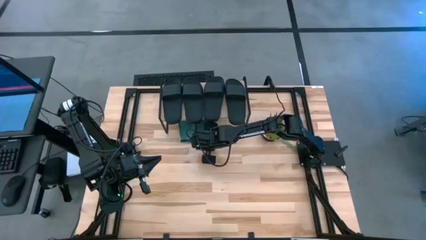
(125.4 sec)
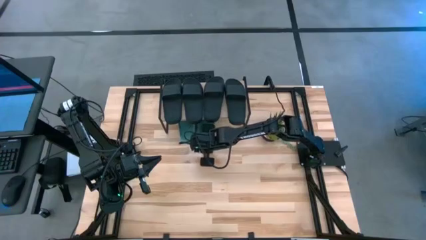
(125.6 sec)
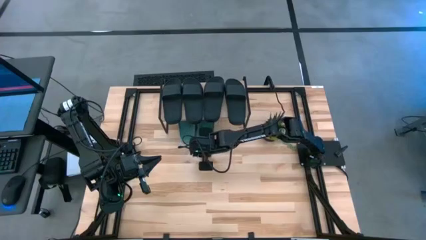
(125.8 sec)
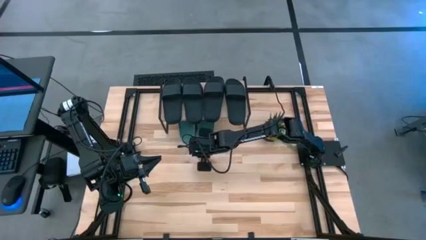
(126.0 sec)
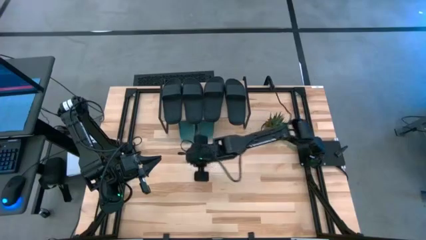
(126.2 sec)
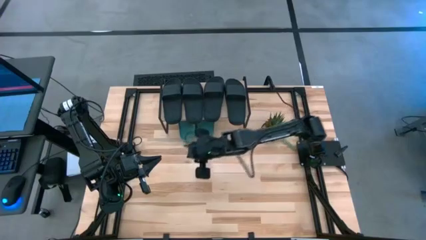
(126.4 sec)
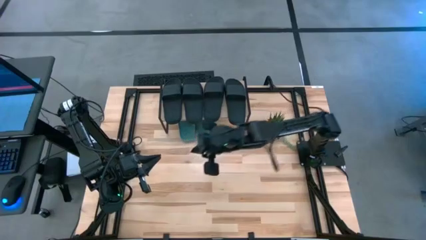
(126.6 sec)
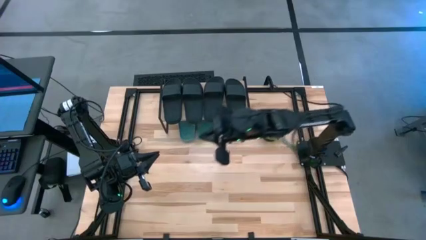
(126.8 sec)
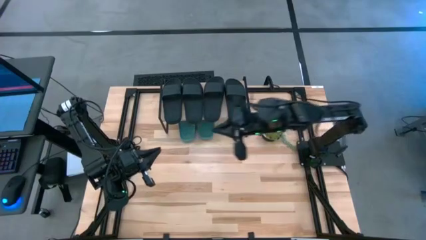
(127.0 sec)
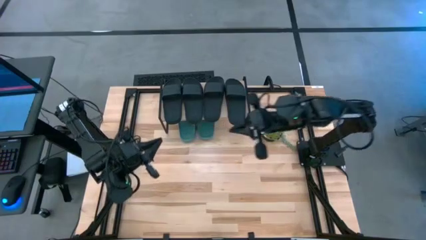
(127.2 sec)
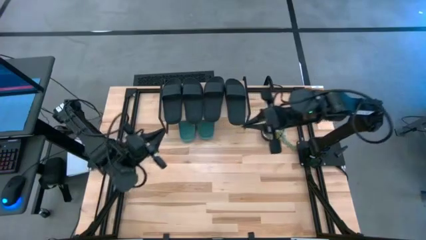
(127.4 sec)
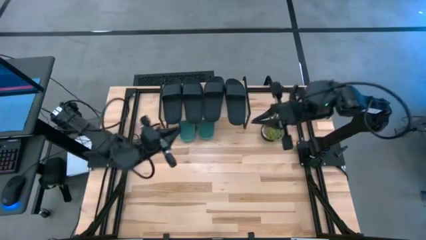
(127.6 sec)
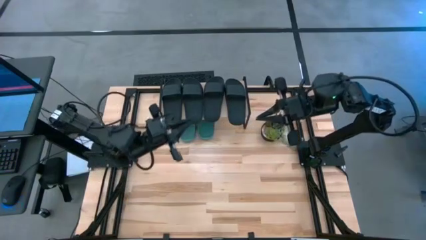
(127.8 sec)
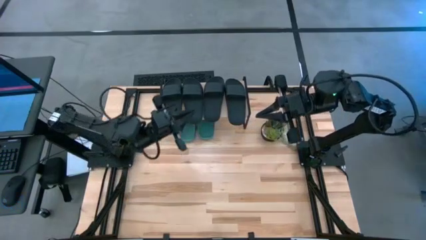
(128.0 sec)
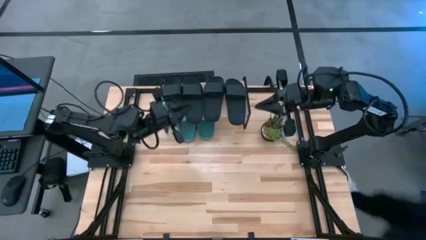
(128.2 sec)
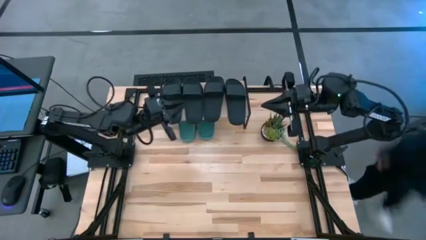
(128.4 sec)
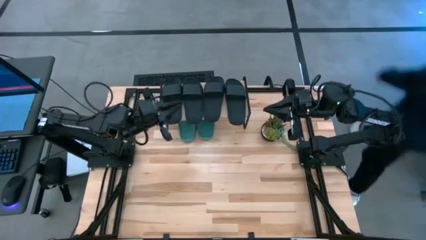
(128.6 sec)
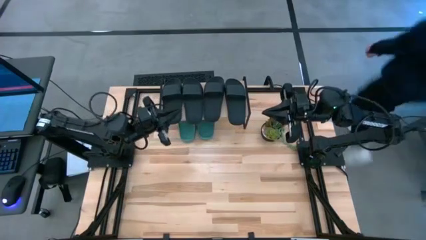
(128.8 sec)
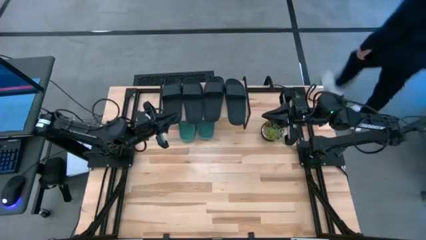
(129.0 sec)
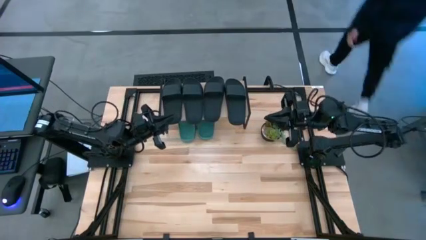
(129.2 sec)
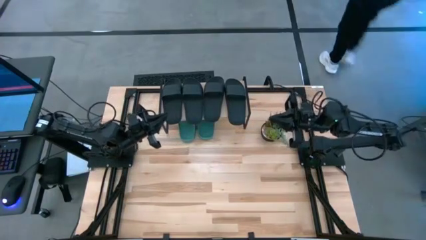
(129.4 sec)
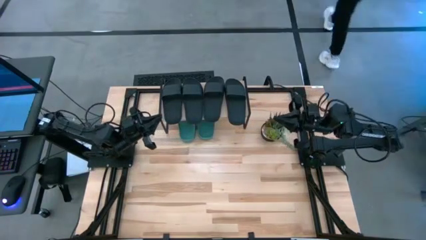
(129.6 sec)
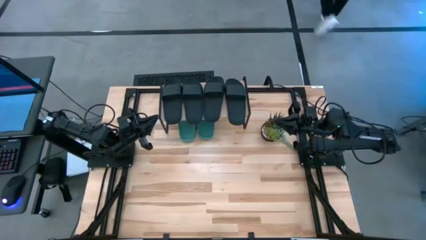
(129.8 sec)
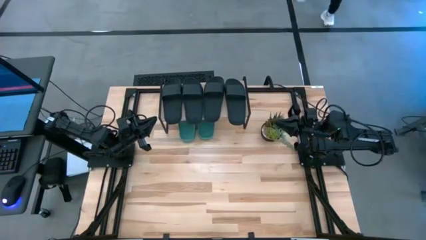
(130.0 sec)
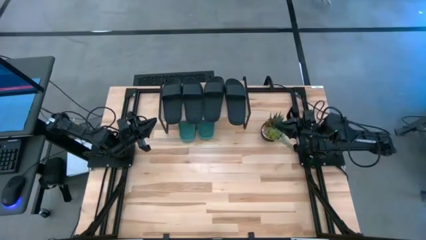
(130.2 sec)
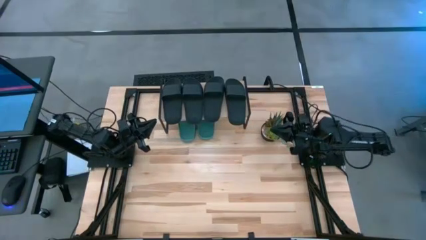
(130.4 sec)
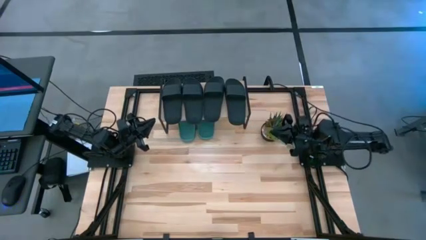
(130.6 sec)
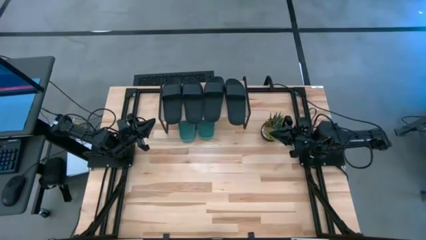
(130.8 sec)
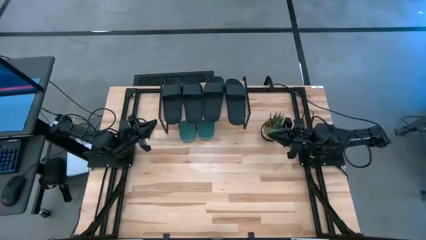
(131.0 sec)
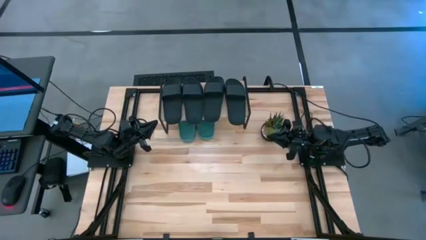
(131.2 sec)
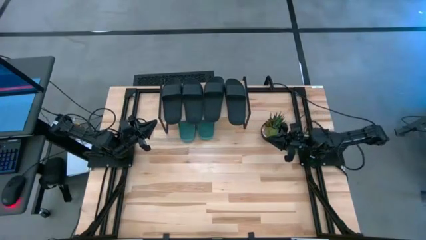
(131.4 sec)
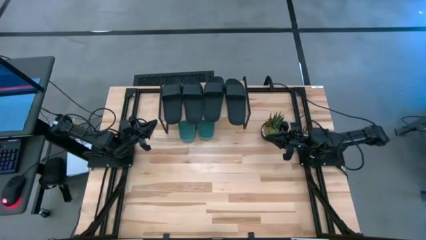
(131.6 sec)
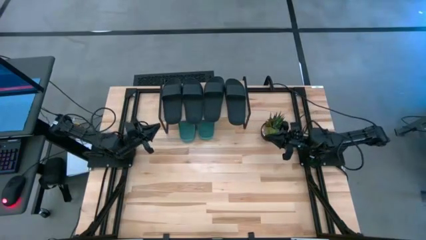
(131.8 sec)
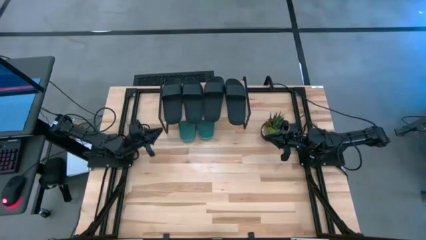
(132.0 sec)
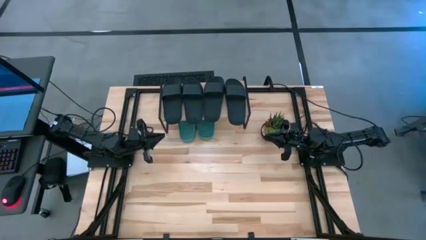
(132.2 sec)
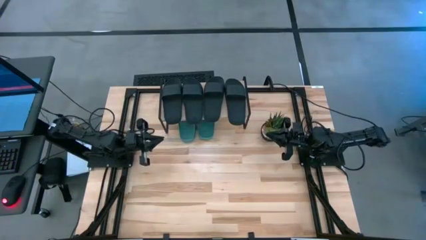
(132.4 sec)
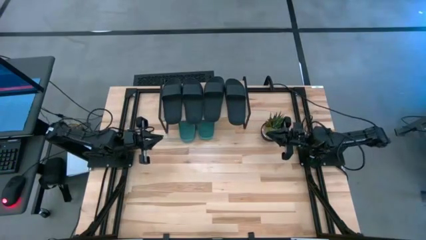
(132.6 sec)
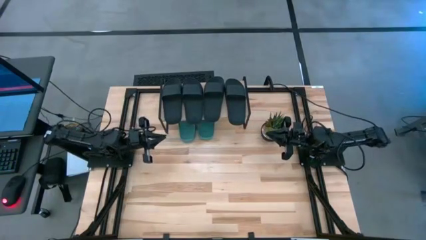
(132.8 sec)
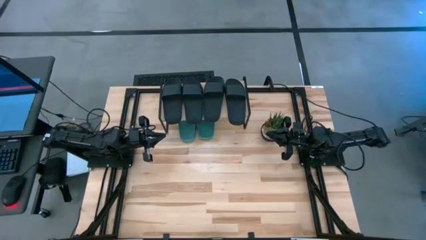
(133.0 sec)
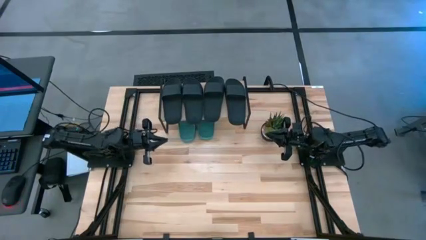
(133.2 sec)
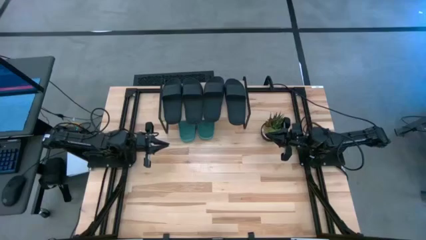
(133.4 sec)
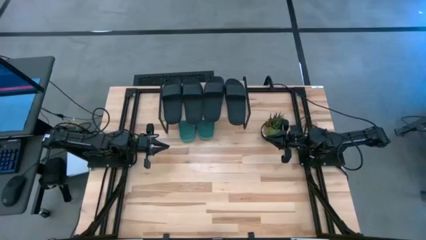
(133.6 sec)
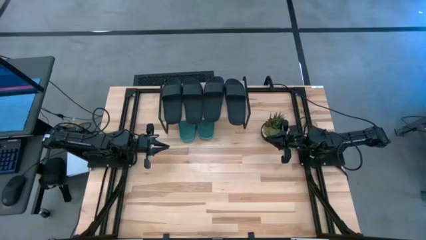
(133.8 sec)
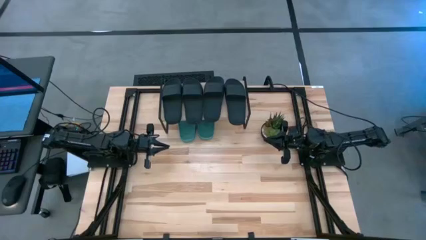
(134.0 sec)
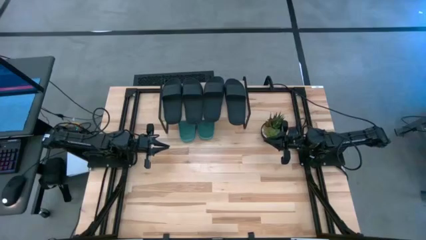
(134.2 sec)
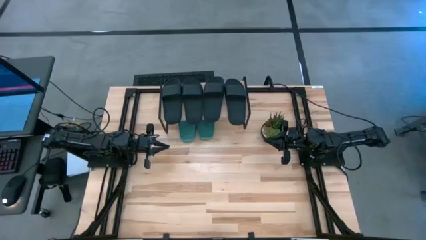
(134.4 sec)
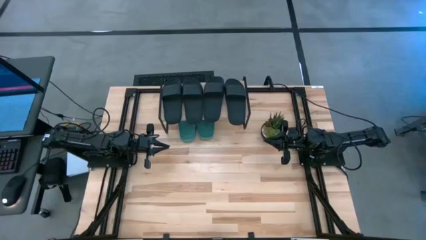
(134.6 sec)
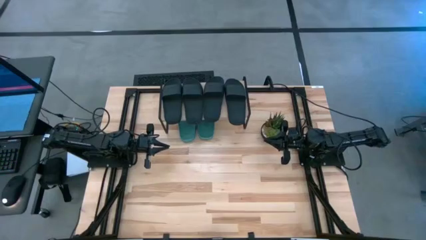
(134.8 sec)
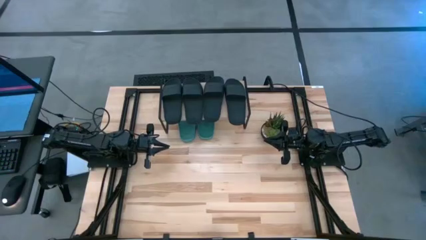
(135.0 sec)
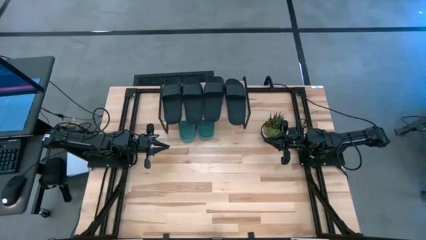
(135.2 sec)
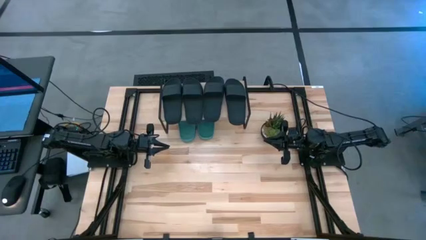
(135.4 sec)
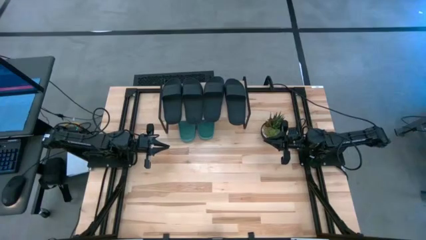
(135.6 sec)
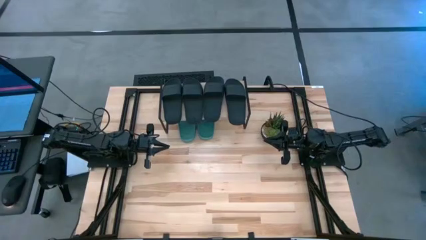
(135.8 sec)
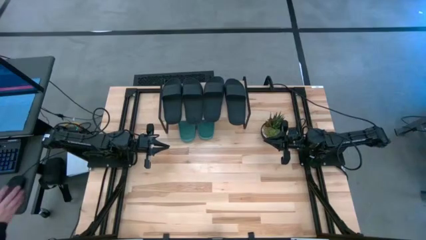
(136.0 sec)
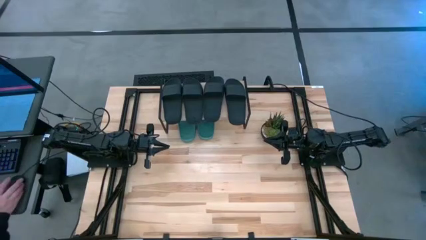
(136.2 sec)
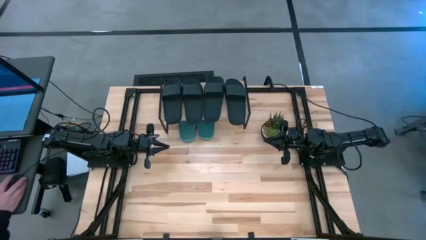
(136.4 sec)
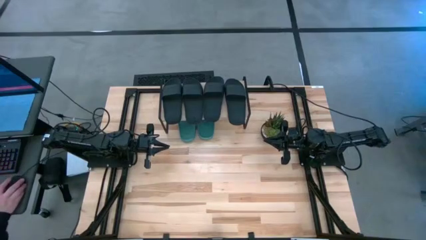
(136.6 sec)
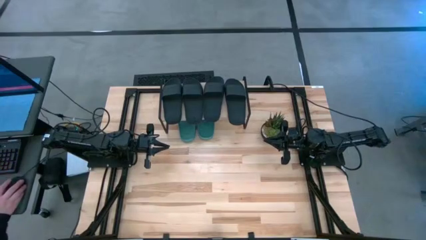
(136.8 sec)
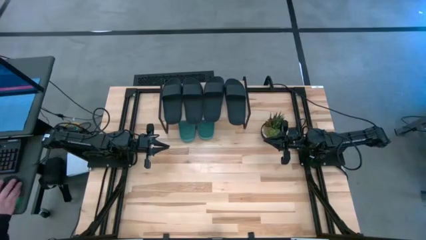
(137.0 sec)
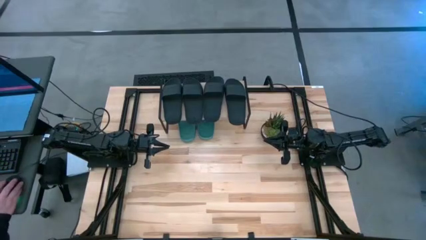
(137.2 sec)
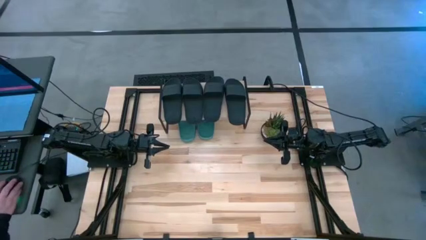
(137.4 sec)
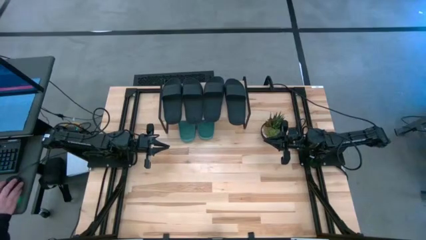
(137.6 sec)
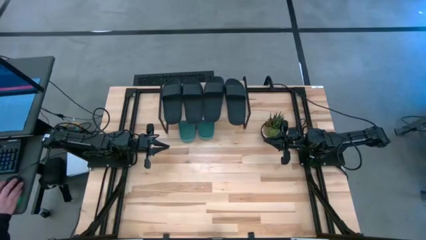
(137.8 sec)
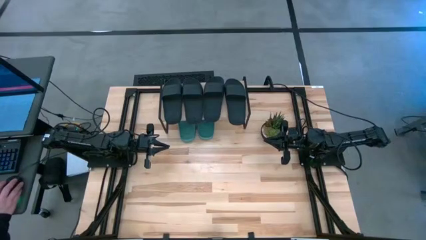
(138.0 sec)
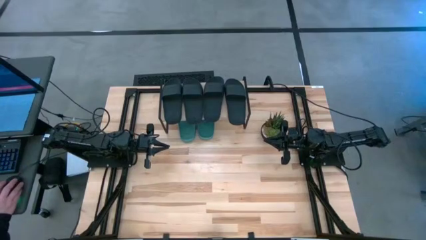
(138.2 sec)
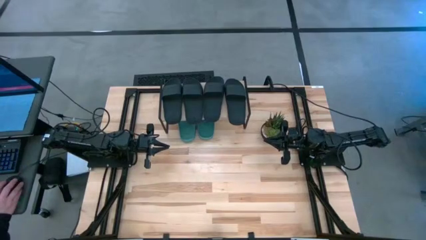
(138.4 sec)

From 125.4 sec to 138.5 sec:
Task: Pick and place slides into the shelf
Return to Home Position

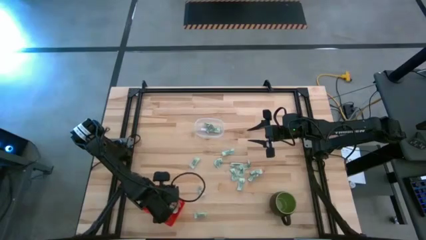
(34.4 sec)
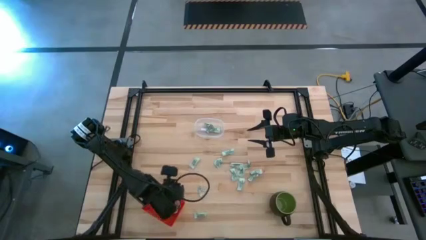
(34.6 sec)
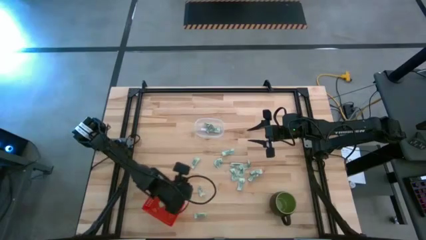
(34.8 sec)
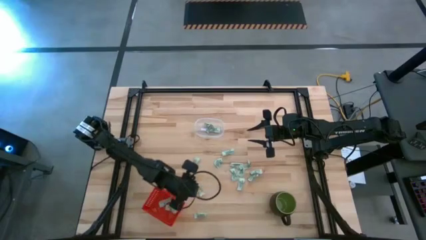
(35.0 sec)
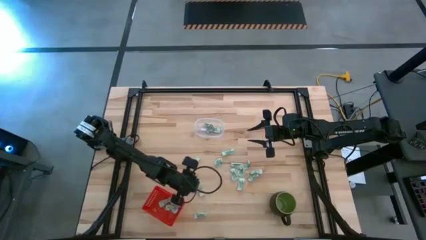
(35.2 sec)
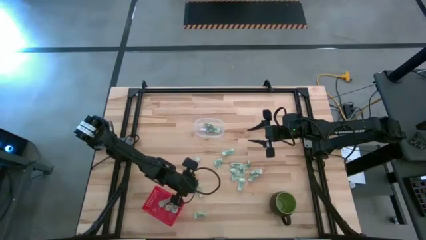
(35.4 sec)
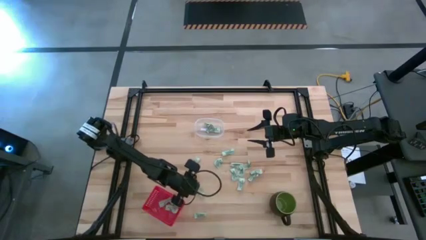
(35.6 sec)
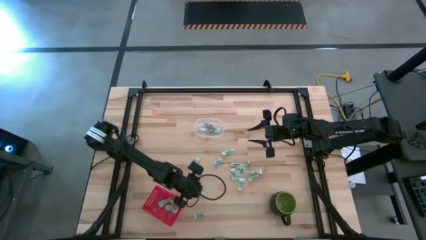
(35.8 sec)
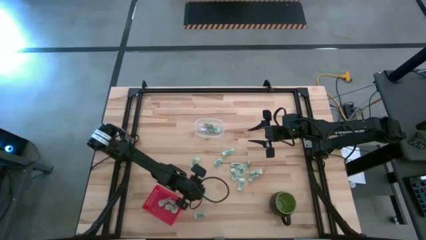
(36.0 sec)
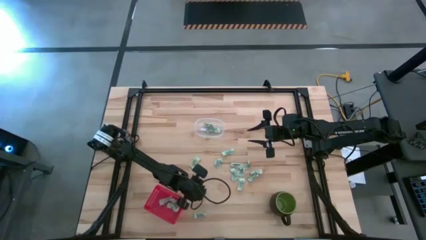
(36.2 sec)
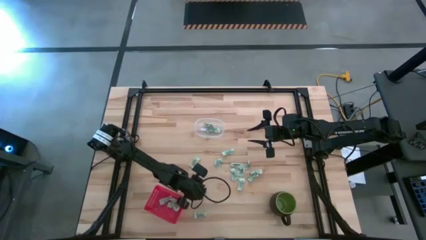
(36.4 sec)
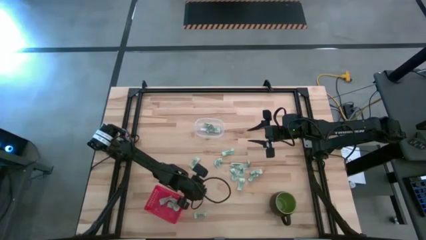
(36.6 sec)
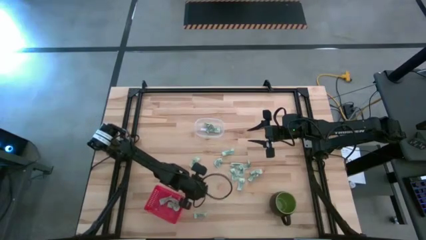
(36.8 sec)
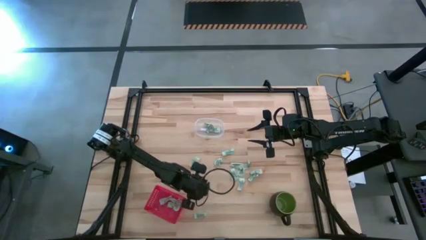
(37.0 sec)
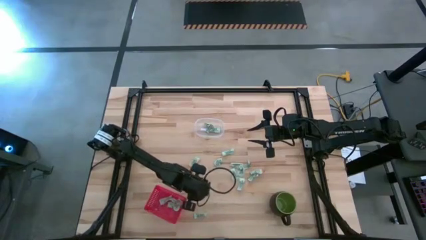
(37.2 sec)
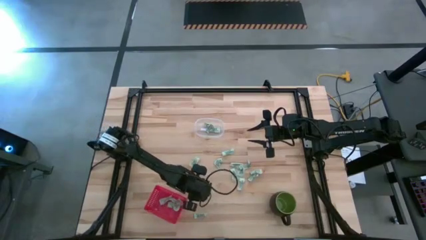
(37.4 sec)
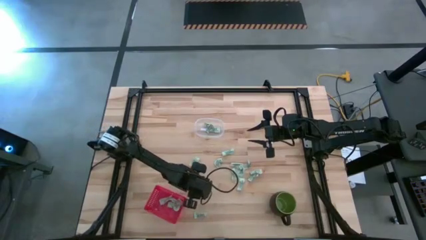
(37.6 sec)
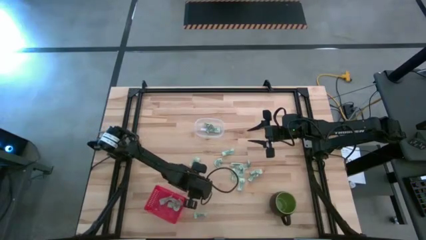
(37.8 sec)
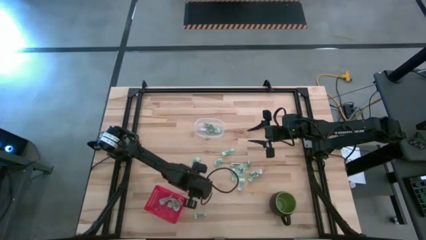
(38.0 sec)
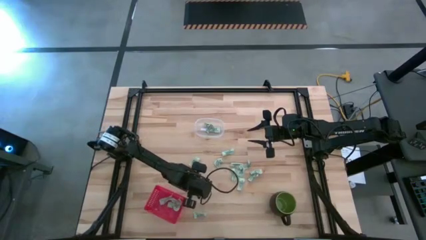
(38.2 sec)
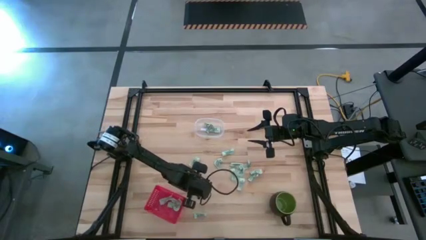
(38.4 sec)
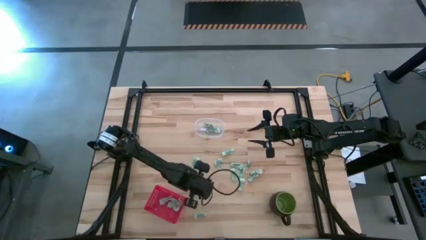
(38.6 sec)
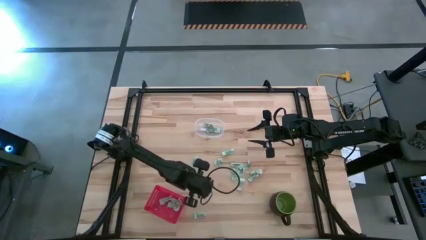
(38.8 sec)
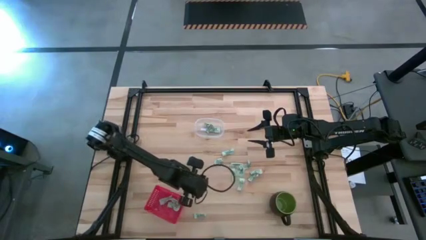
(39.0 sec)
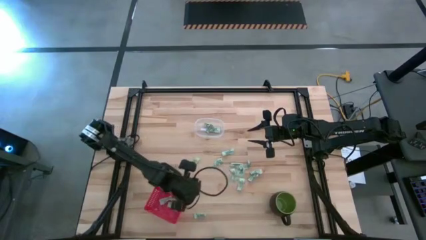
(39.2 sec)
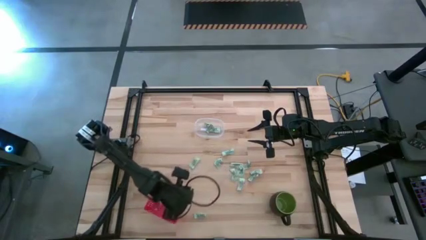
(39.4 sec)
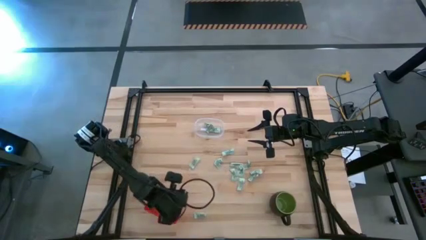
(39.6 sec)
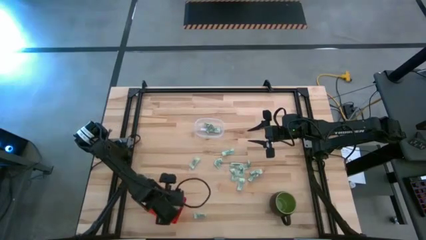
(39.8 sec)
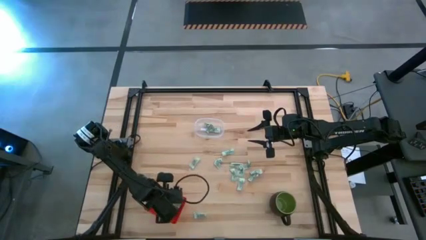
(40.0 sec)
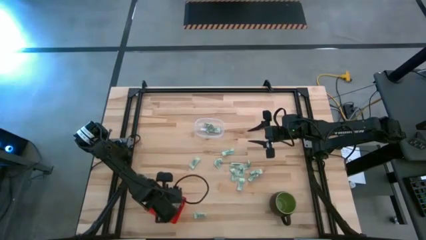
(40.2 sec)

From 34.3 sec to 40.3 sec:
Task: Pick and place items into bin
Put the stevia packet into the orange bin
